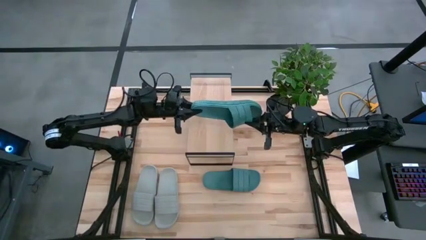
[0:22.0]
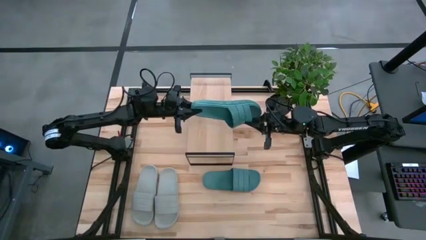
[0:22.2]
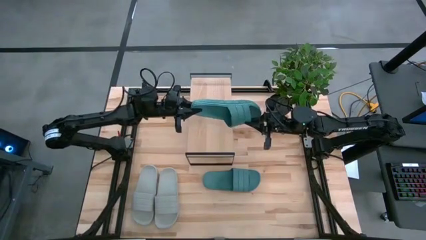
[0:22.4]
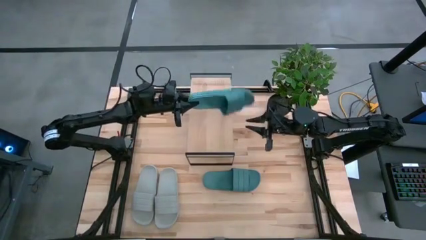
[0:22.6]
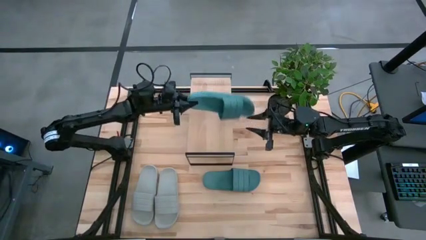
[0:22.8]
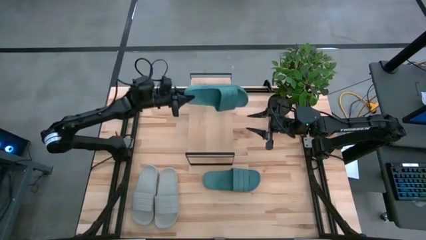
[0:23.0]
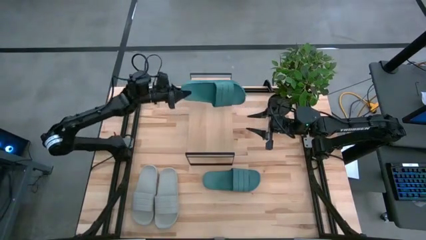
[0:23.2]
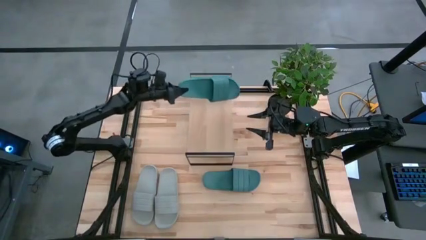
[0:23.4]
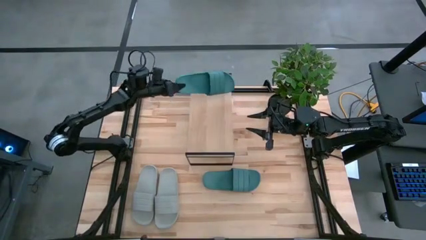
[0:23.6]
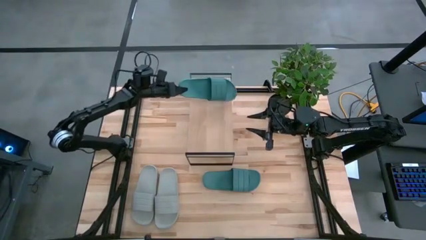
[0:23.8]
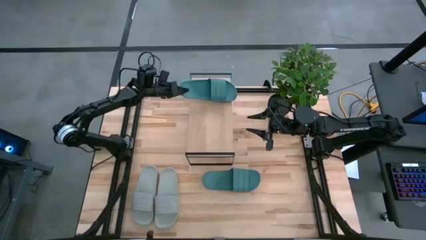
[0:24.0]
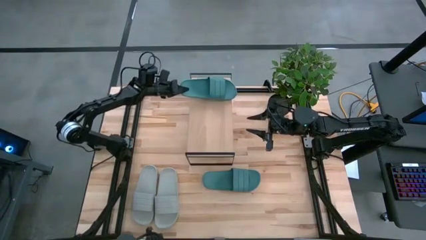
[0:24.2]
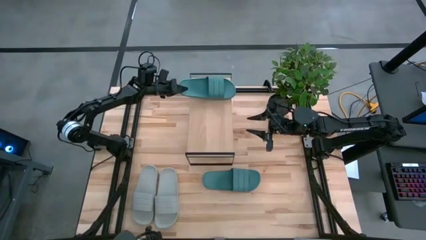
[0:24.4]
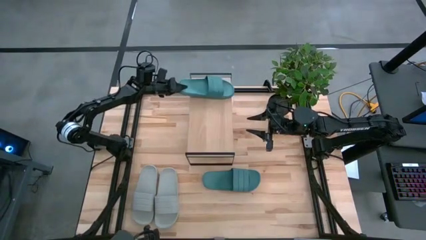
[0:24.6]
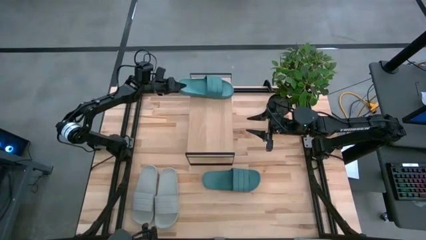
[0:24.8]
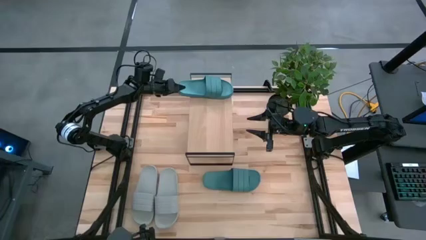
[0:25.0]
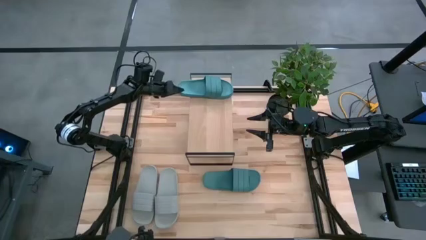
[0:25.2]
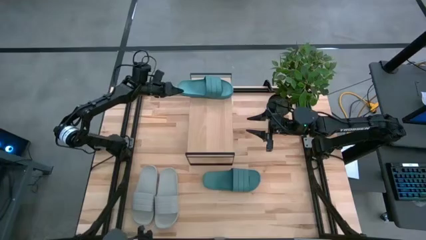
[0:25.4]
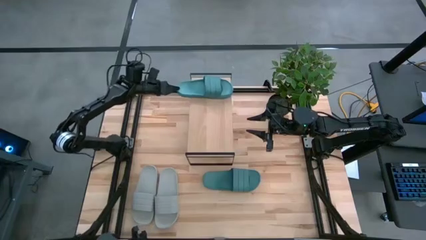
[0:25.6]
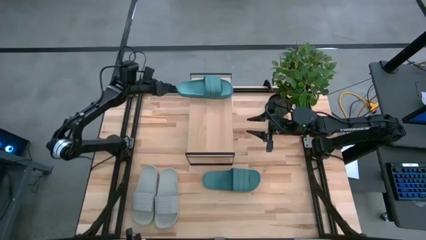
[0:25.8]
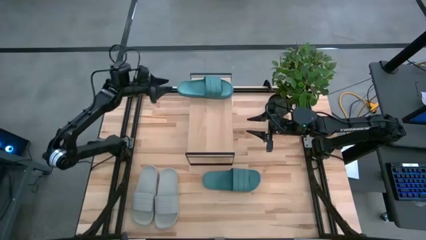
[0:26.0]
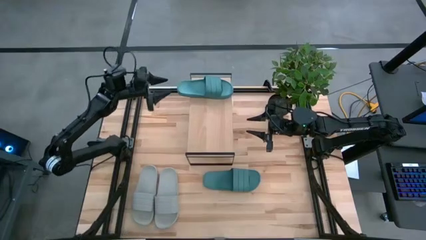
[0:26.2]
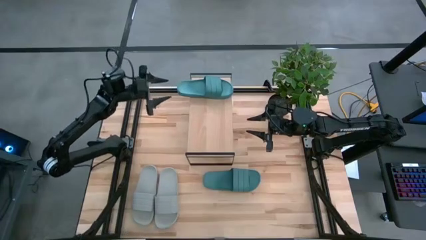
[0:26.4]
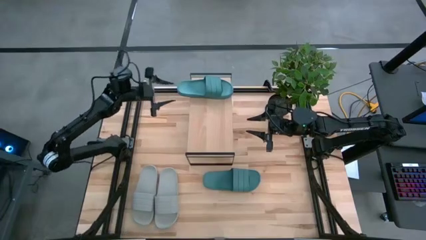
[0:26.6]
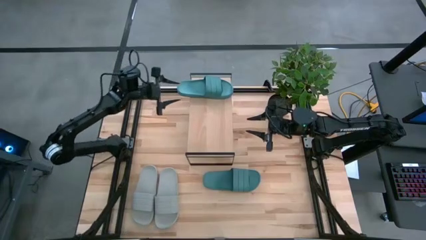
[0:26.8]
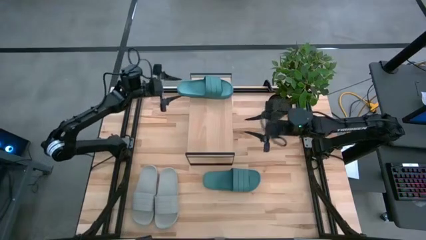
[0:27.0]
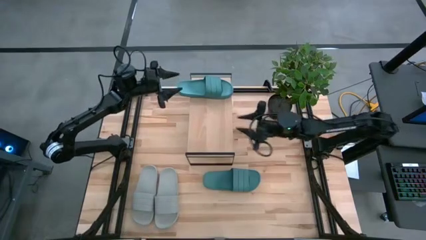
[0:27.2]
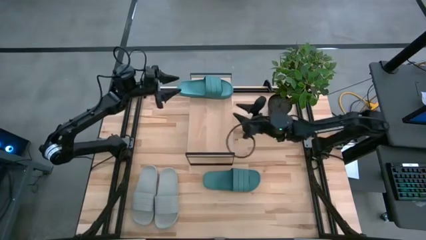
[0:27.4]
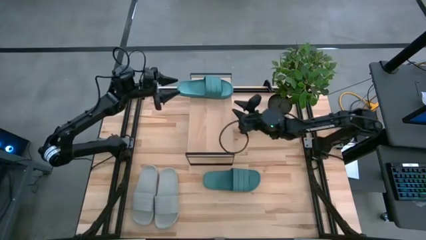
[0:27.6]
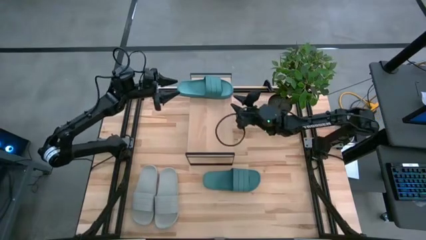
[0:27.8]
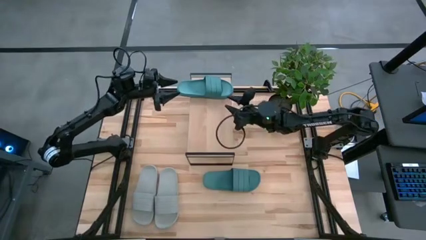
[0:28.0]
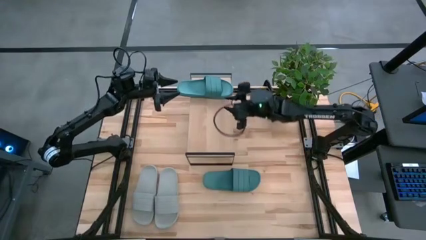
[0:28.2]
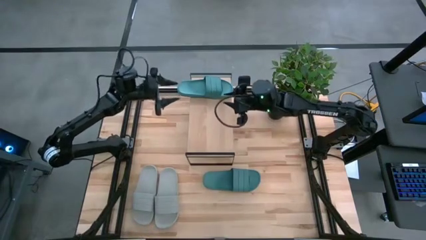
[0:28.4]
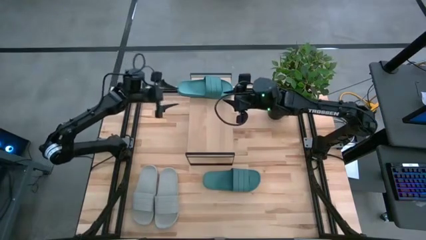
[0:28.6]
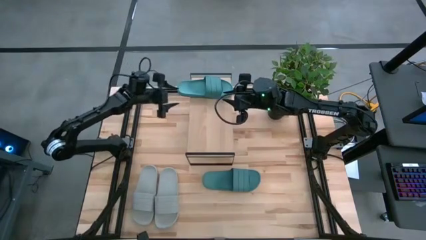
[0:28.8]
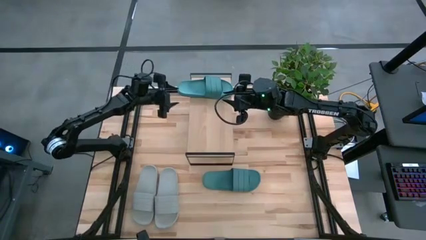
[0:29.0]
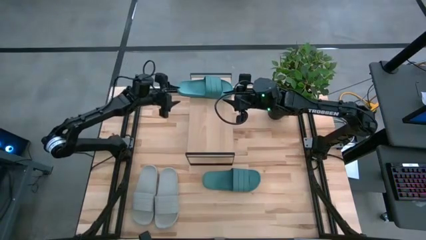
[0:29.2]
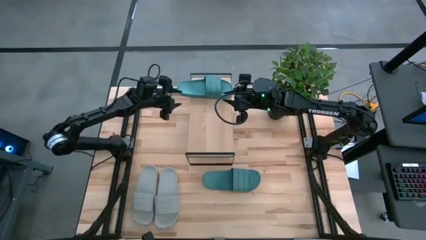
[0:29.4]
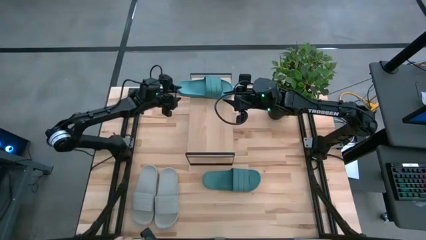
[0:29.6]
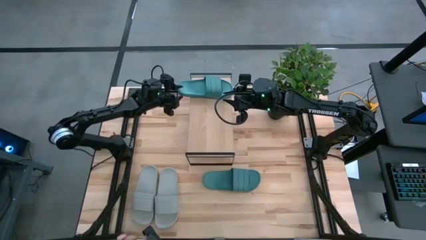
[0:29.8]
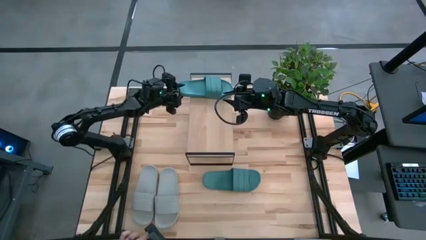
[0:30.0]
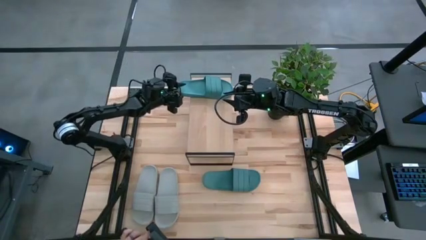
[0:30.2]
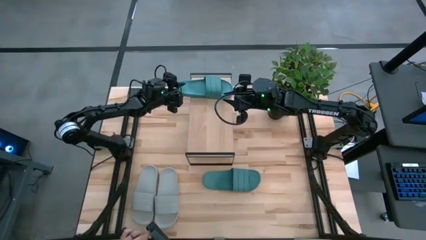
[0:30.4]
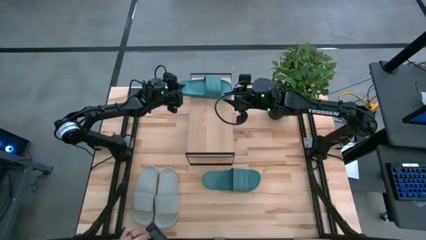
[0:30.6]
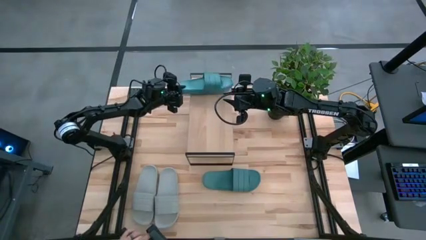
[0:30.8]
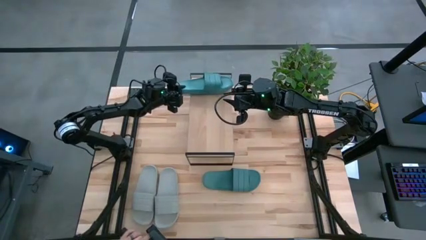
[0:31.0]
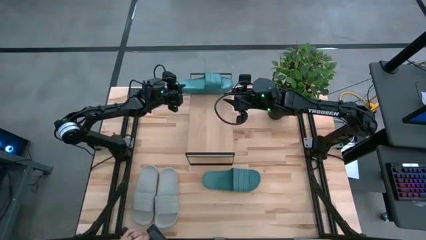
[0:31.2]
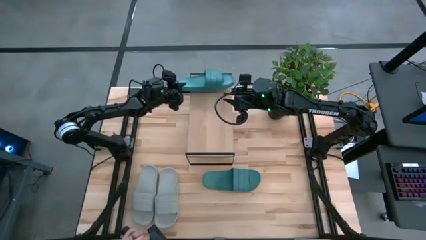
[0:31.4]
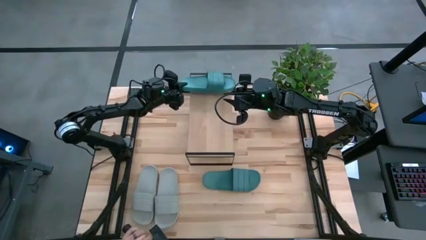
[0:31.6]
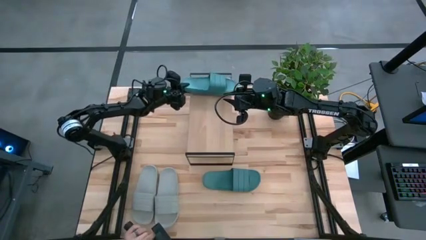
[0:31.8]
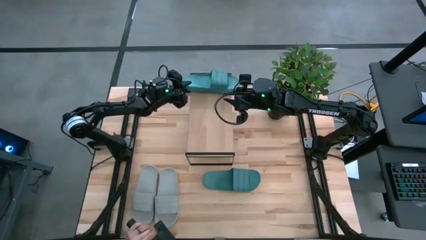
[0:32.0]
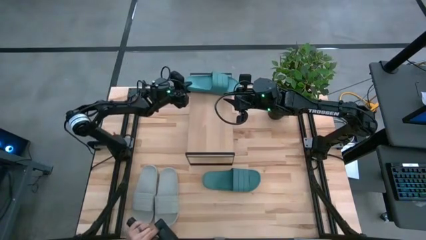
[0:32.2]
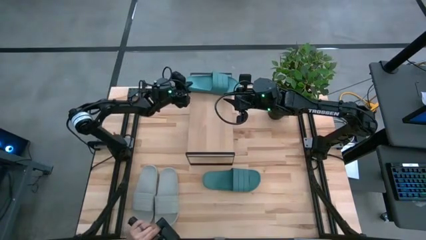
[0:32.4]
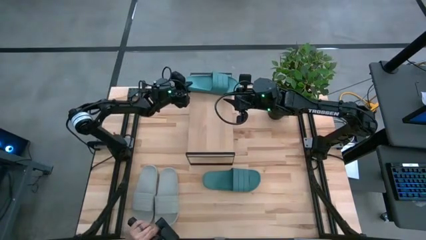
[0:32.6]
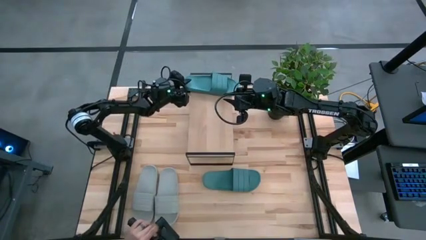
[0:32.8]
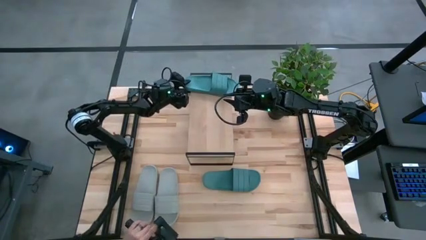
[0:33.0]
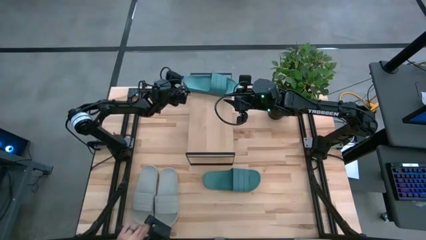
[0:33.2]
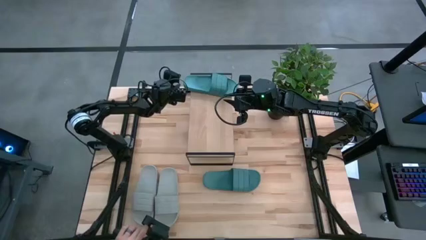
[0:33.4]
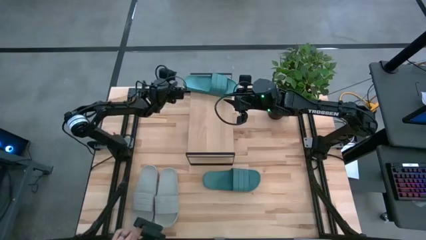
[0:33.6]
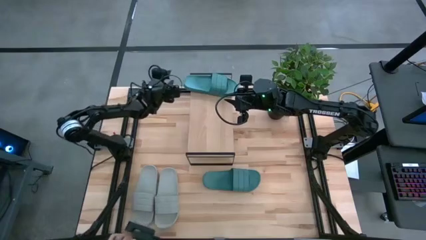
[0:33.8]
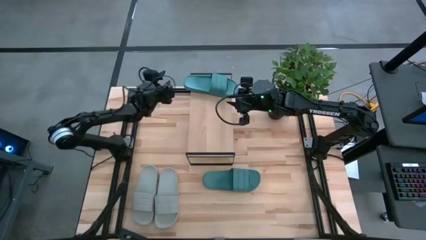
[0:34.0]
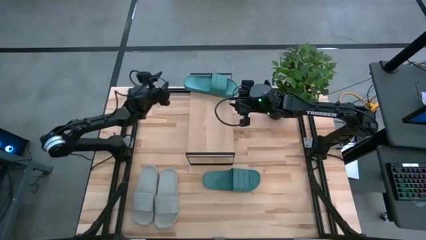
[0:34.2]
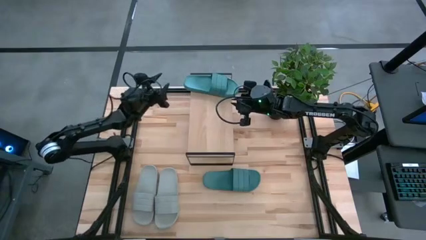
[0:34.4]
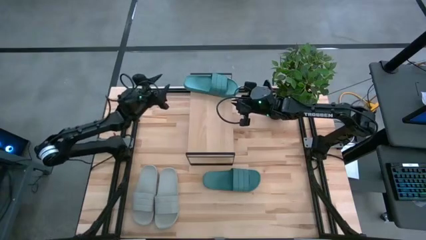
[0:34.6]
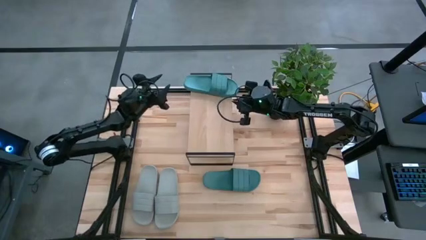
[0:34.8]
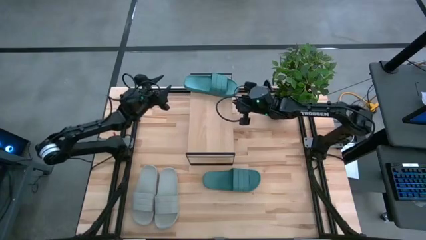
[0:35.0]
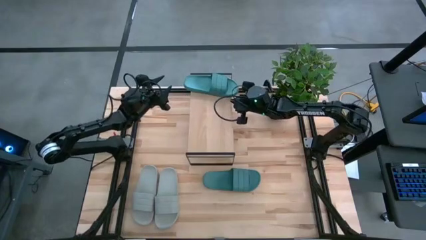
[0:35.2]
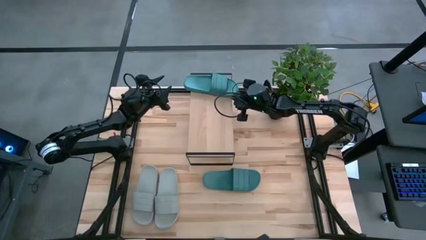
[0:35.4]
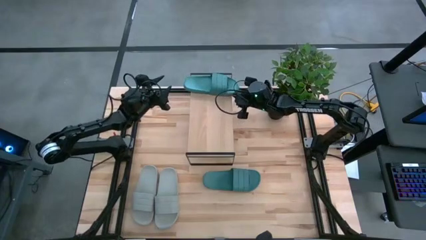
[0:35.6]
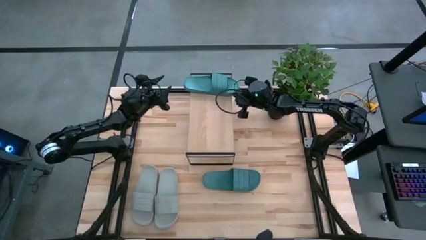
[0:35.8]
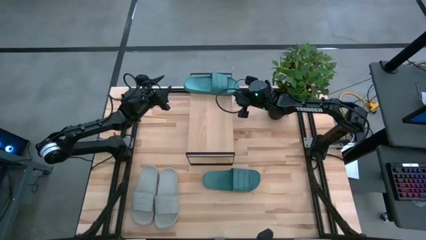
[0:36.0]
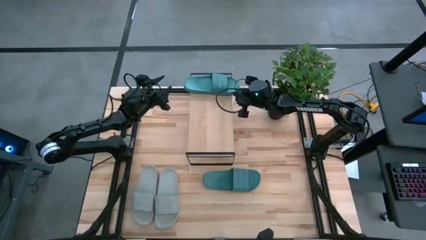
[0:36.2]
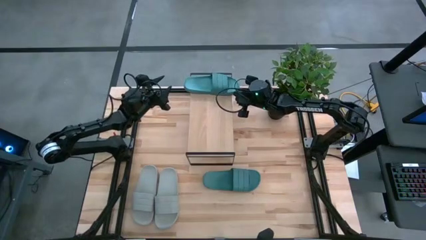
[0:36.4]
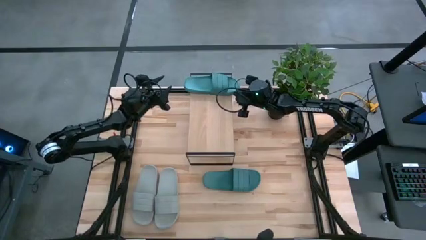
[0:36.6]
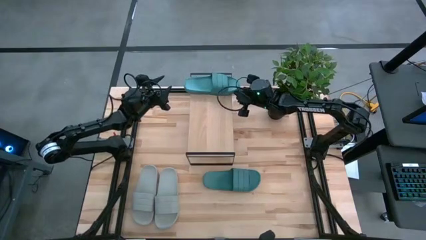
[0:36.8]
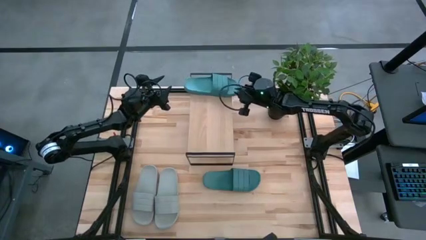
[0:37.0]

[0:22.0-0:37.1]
Task: Pick and place slides into the shelf
Put the top green slide on the shelf
